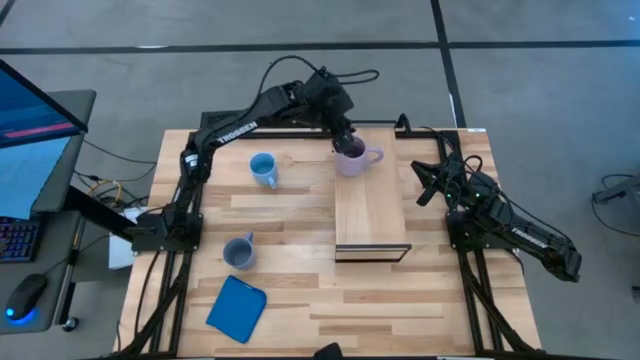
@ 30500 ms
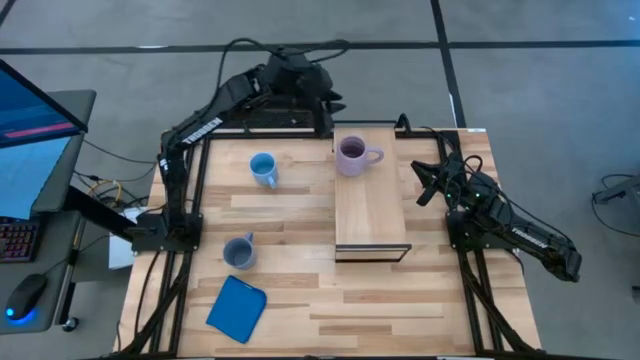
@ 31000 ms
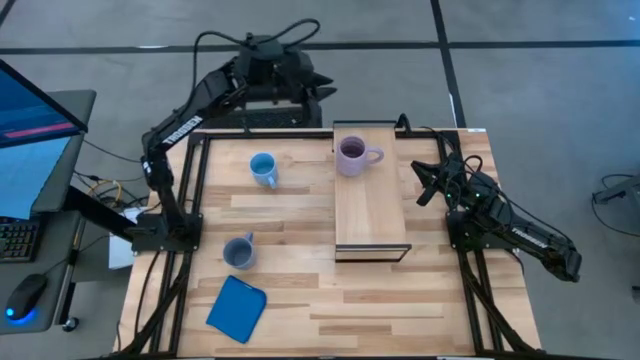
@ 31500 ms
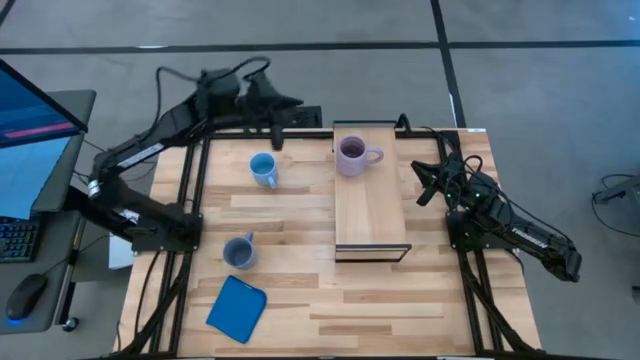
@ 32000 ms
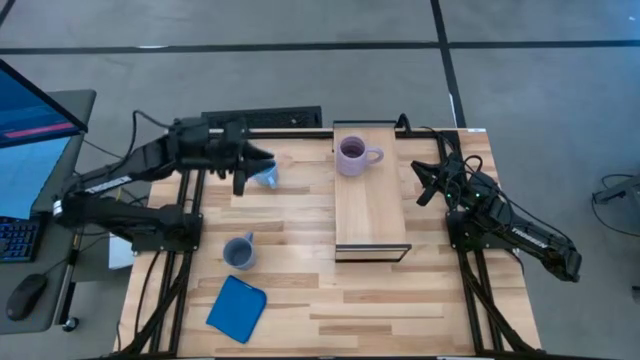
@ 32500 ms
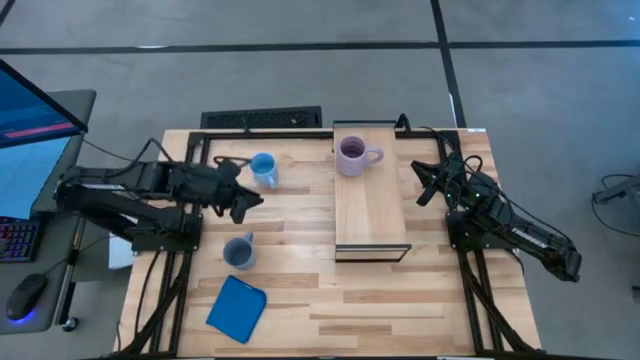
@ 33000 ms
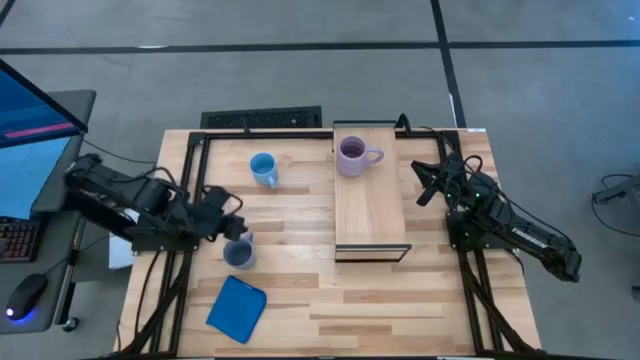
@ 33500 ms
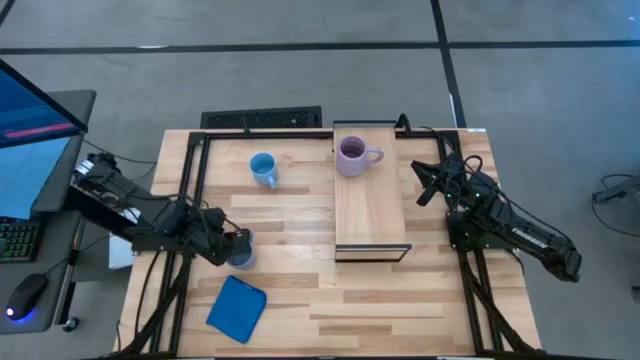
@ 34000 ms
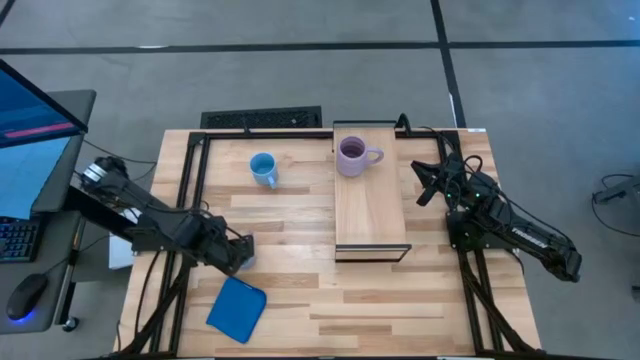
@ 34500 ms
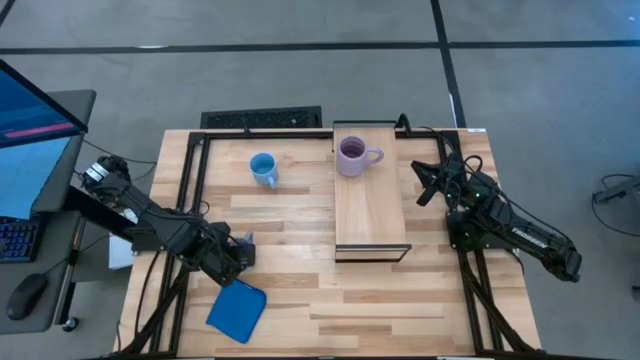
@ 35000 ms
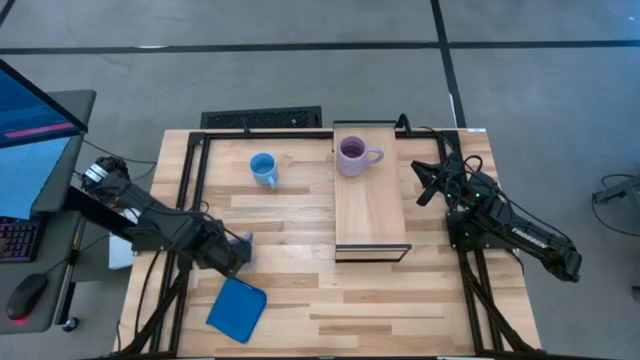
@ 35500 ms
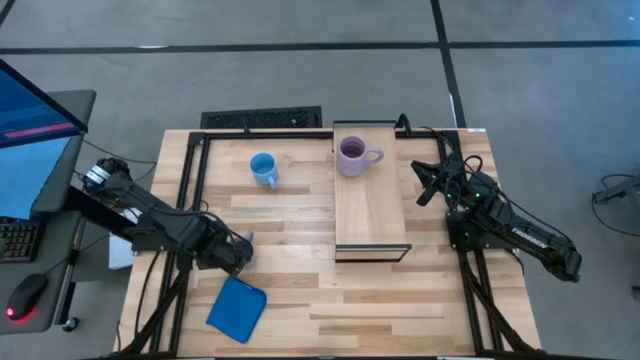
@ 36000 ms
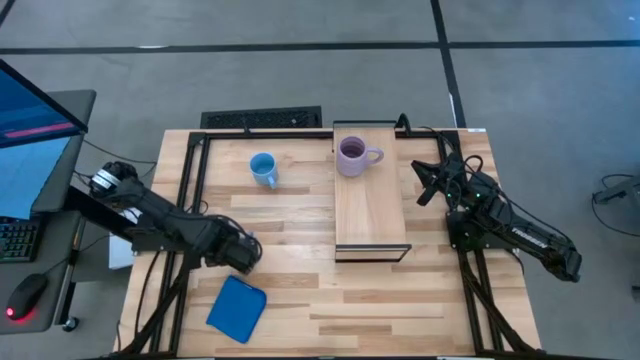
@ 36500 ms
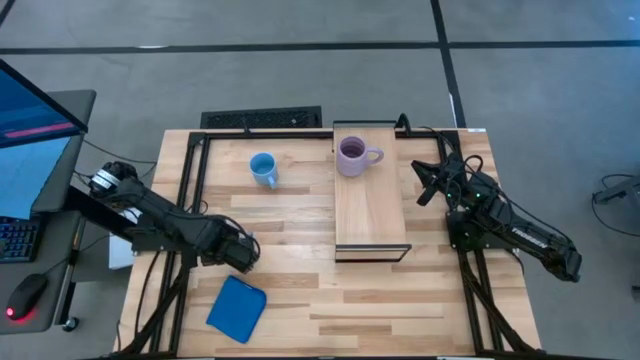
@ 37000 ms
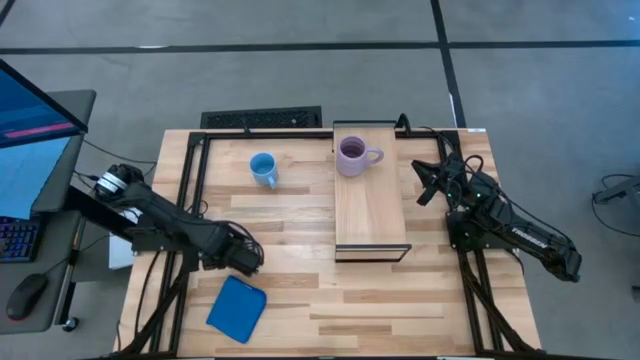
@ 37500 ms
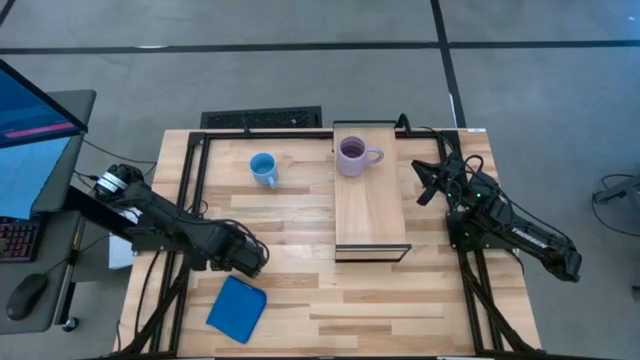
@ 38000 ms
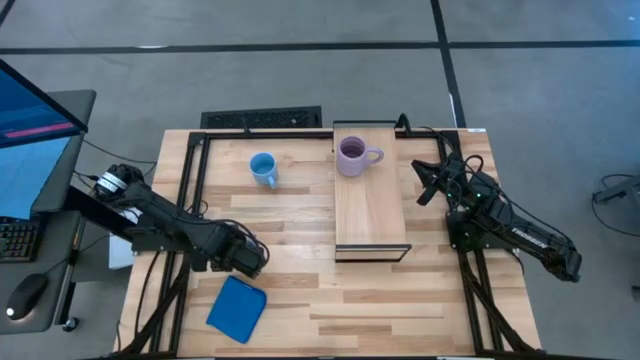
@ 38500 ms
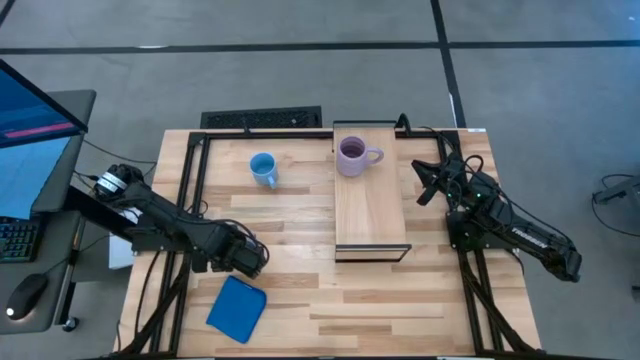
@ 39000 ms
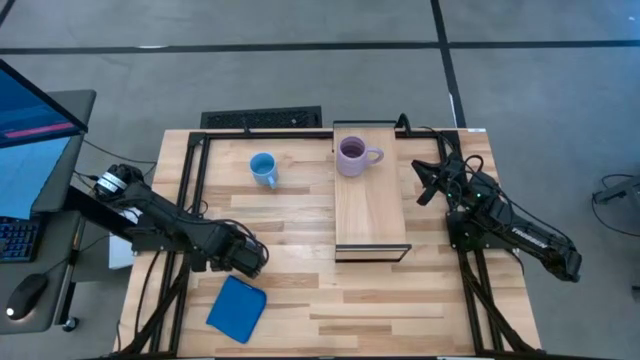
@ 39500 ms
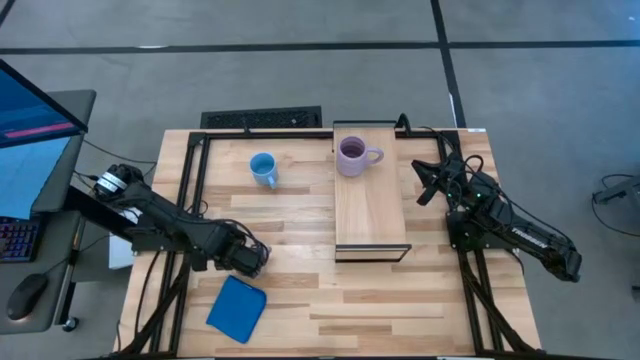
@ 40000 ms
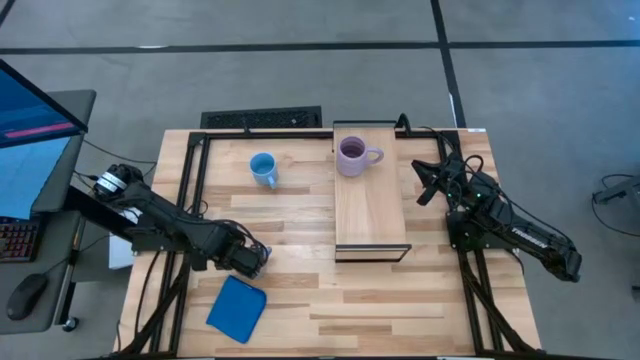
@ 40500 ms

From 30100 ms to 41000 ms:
Task: Stack small to large cups/mugs on shelf
Put the blue mug on the shelf

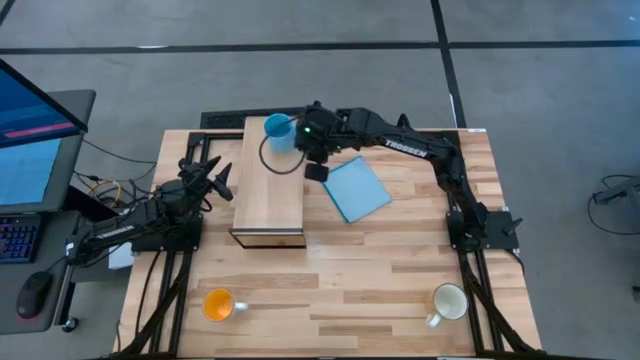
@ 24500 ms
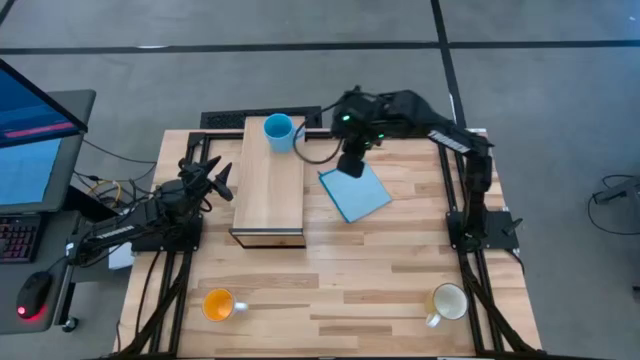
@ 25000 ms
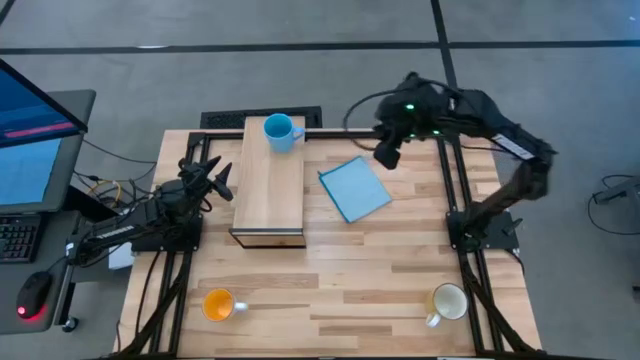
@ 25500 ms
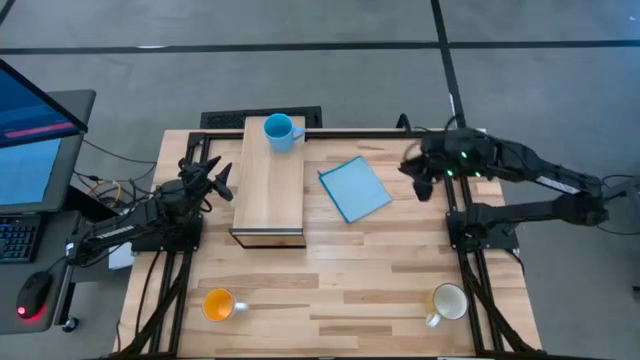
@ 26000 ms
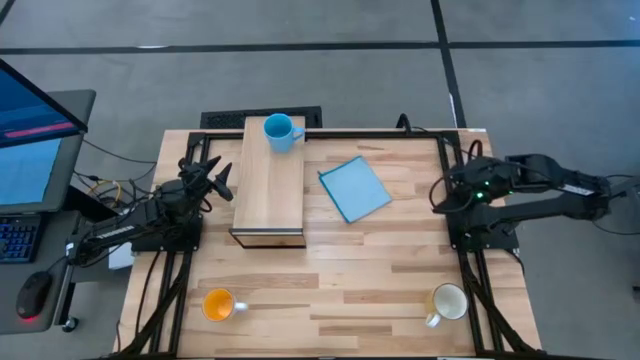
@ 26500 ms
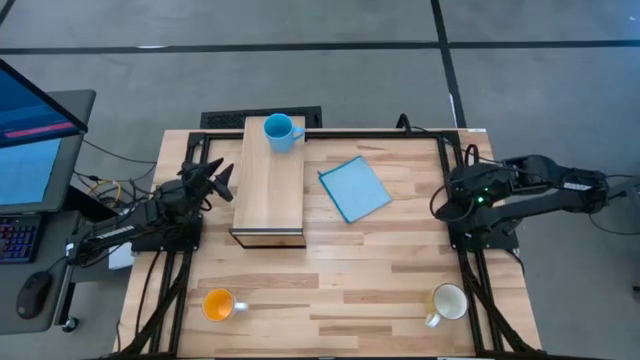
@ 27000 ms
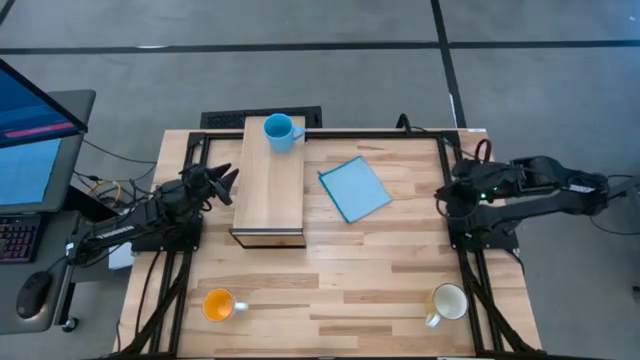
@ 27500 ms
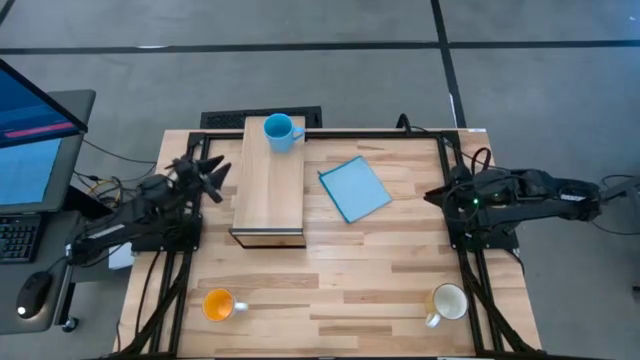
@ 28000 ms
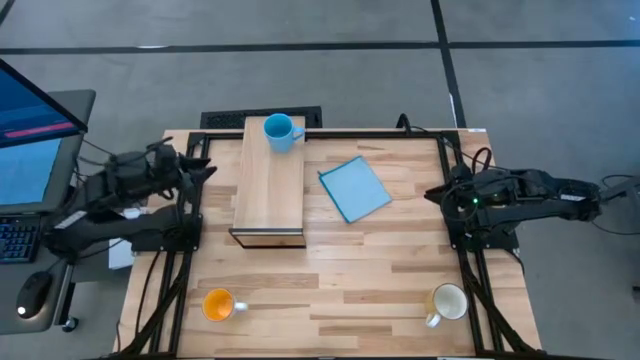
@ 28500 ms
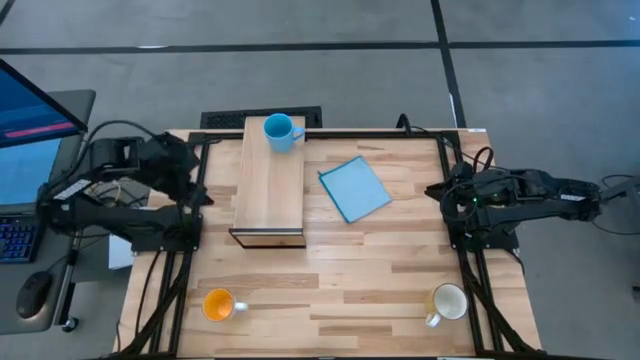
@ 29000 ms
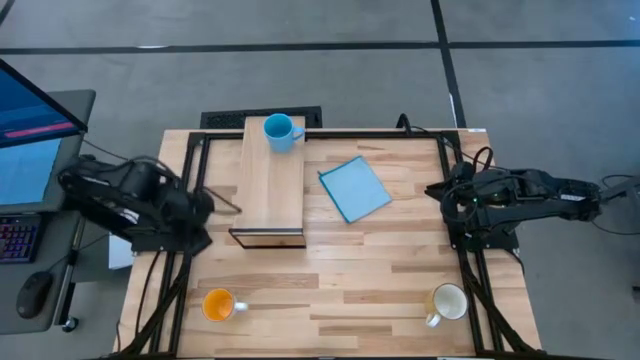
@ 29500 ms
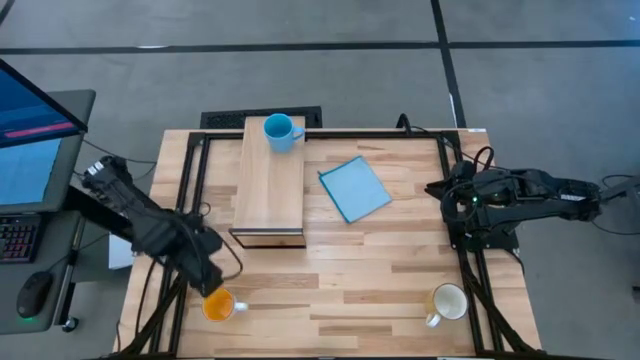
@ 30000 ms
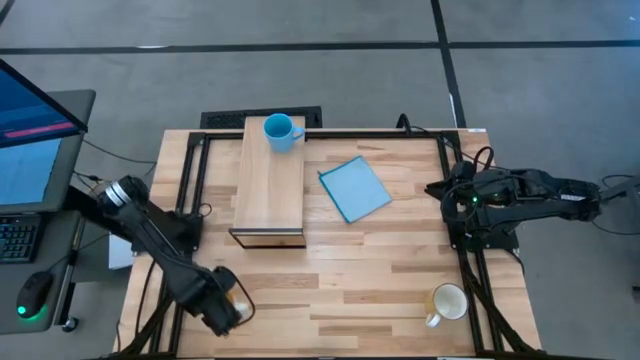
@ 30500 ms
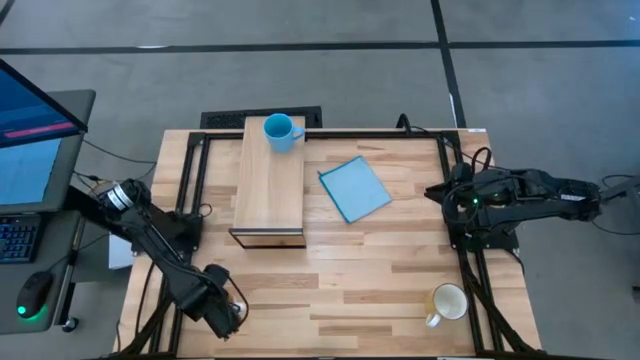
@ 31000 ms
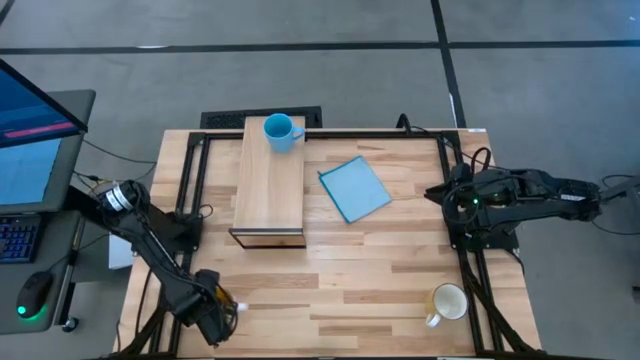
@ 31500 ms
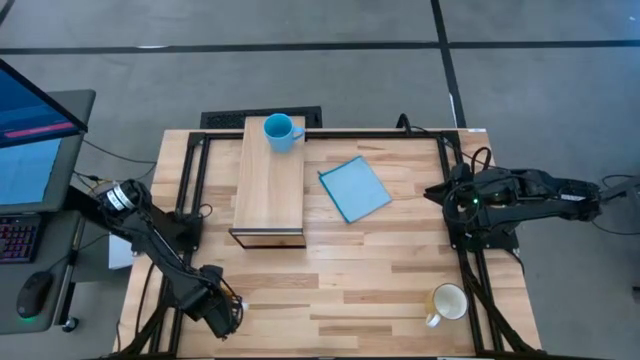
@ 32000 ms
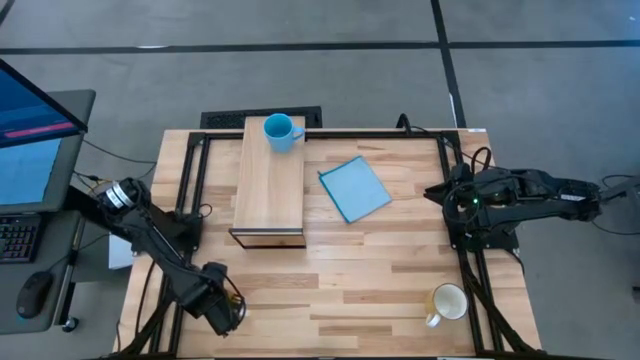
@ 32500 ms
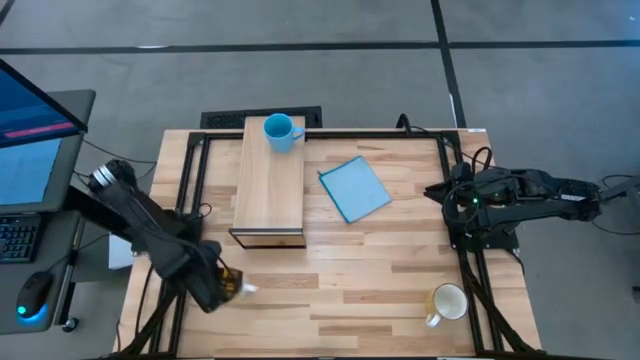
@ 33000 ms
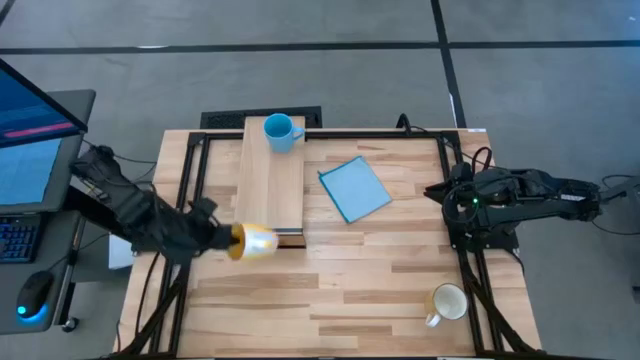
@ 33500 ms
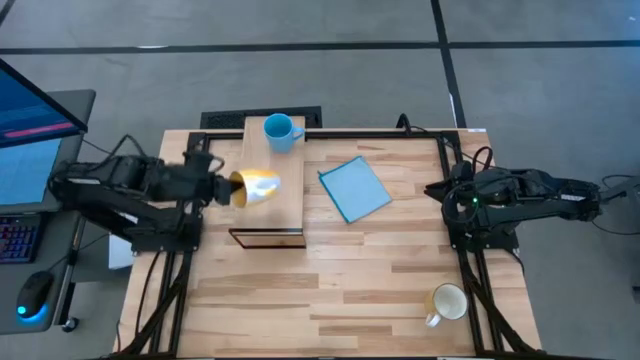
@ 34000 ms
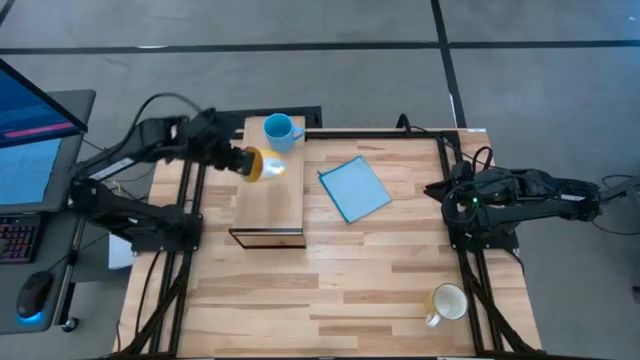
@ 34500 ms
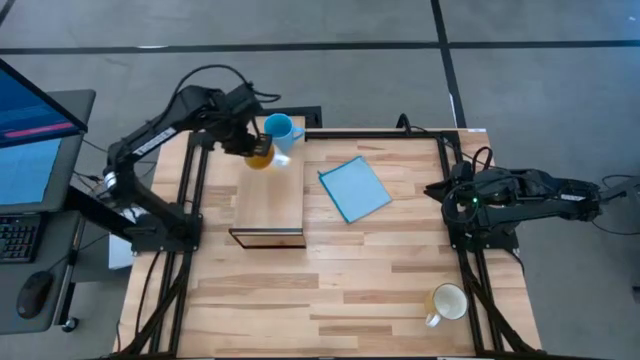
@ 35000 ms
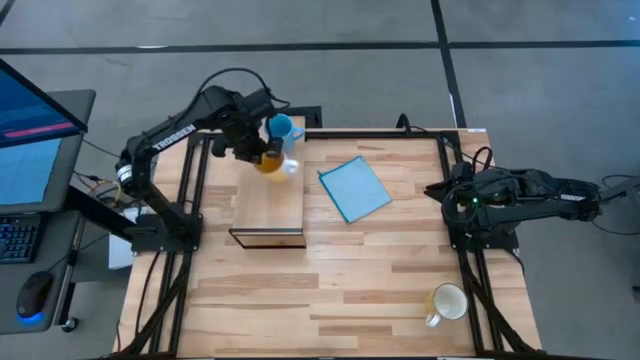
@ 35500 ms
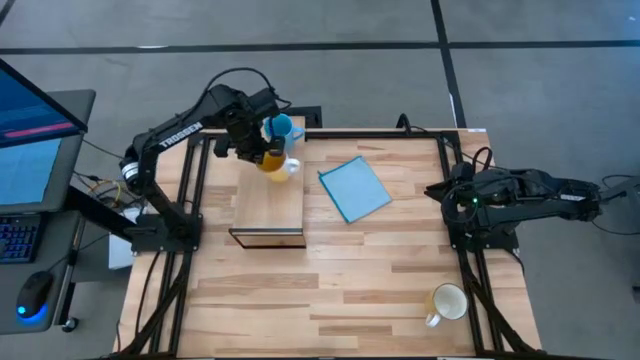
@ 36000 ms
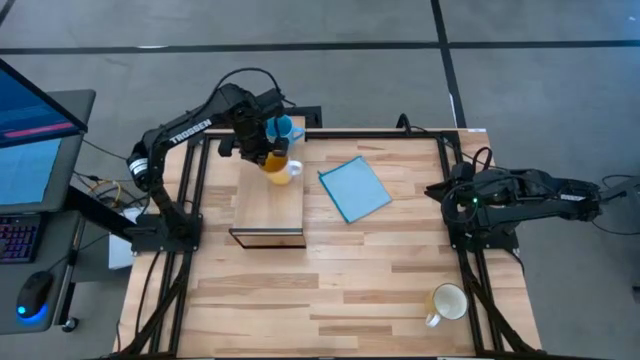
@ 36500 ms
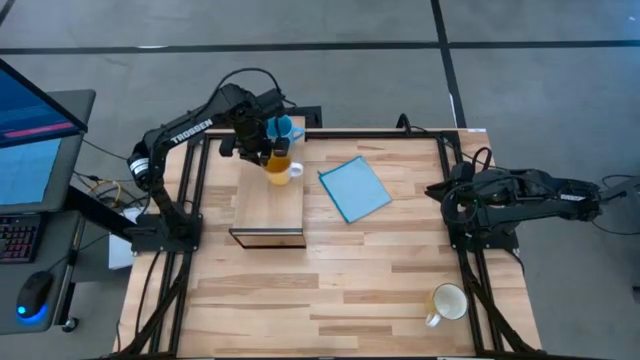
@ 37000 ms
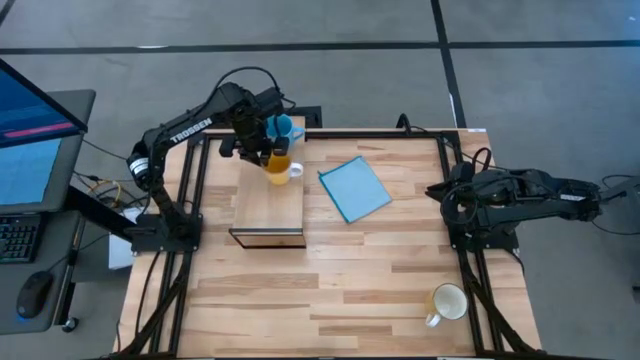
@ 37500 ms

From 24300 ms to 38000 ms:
Task: Stack small to large cups/mugs on shelf
Put the yellow mug on the shelf
